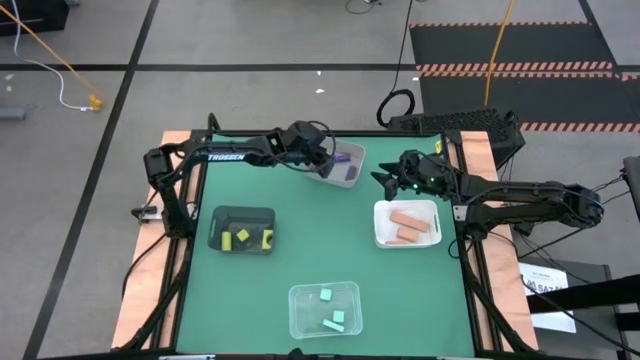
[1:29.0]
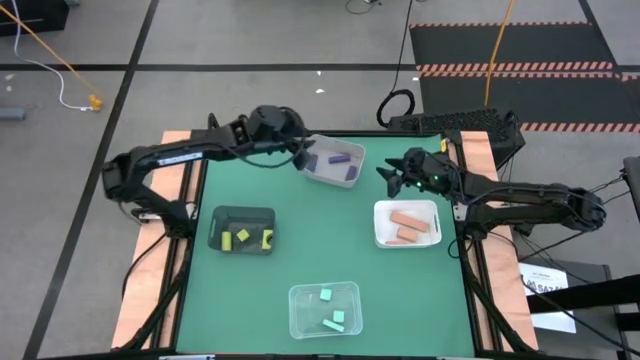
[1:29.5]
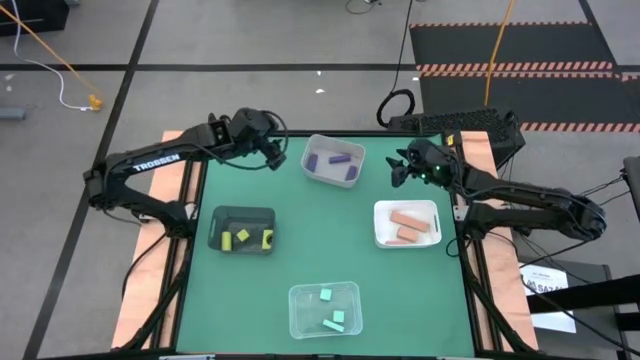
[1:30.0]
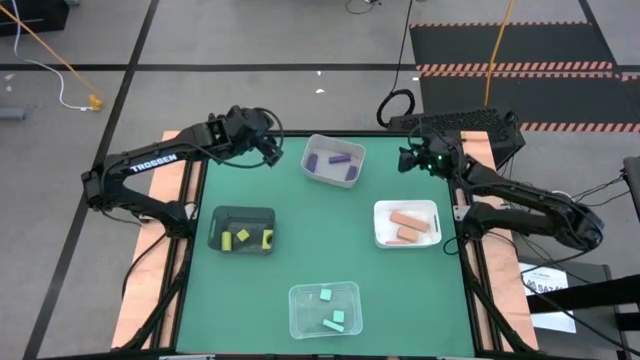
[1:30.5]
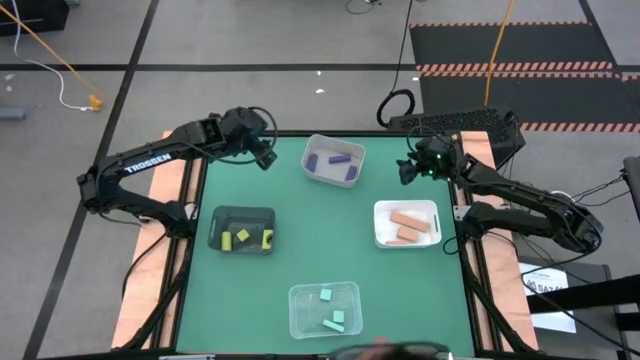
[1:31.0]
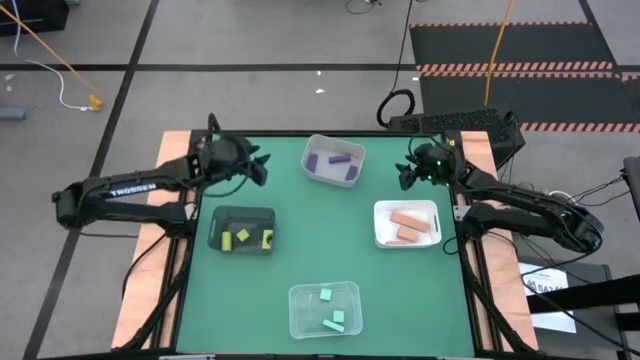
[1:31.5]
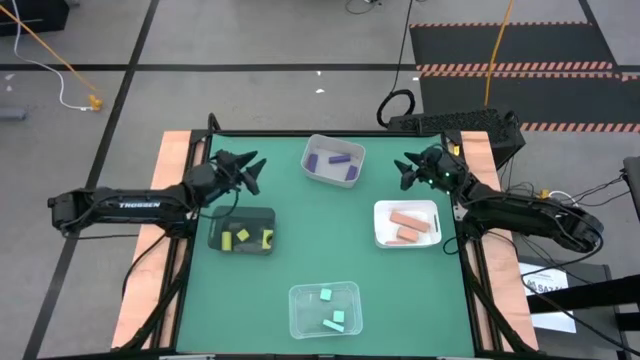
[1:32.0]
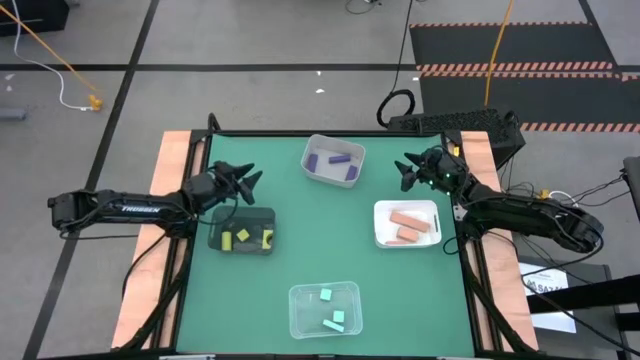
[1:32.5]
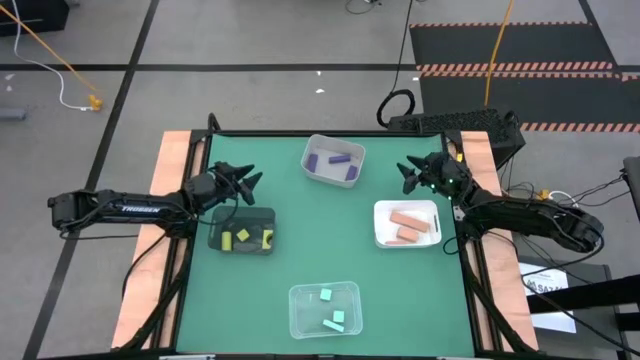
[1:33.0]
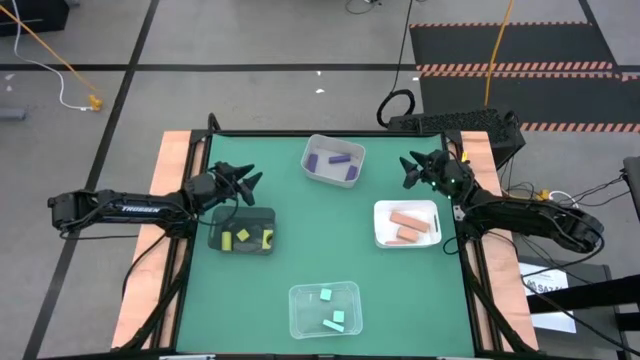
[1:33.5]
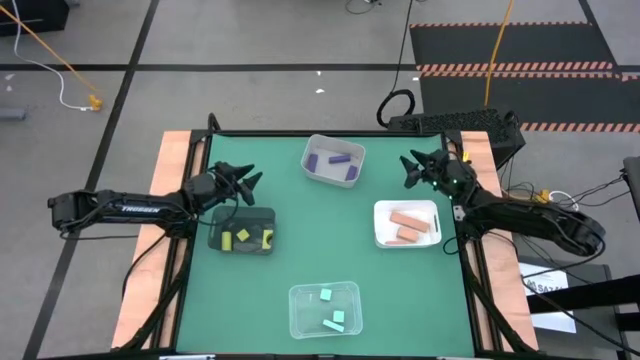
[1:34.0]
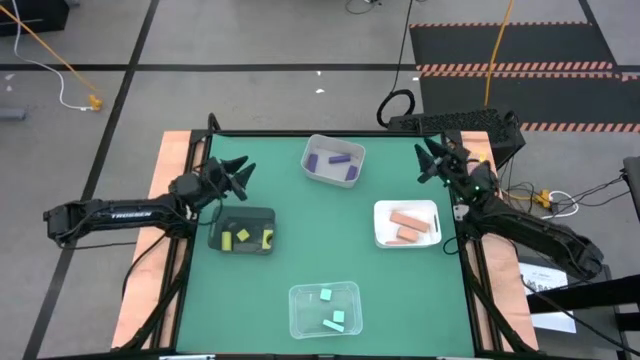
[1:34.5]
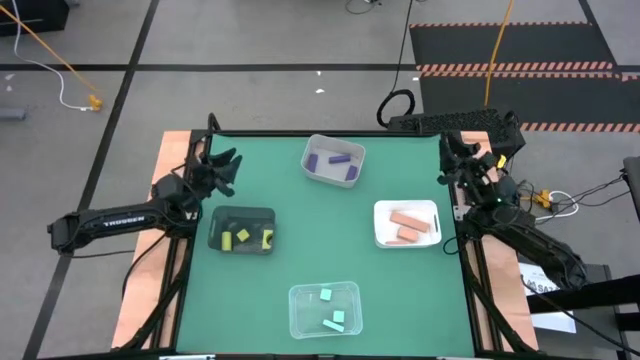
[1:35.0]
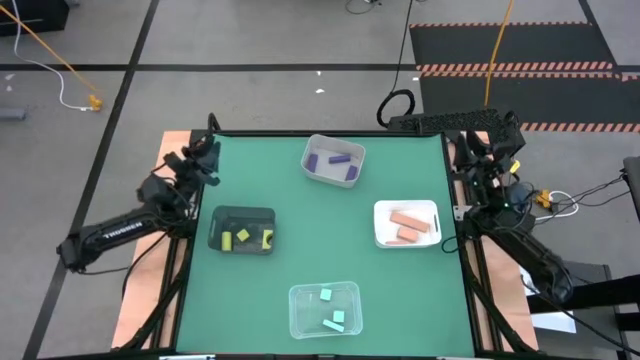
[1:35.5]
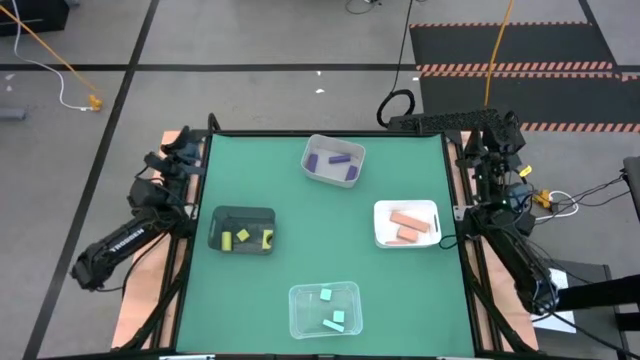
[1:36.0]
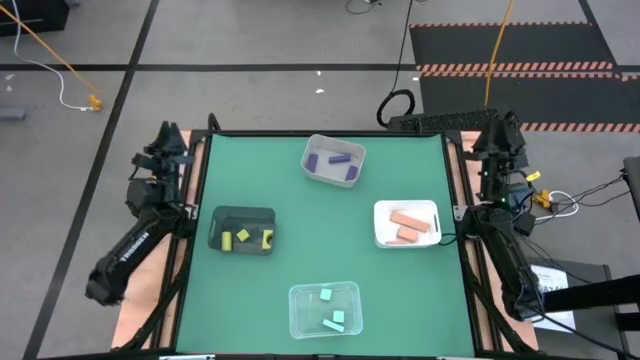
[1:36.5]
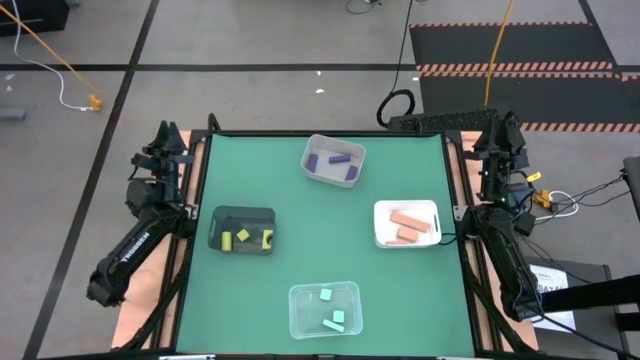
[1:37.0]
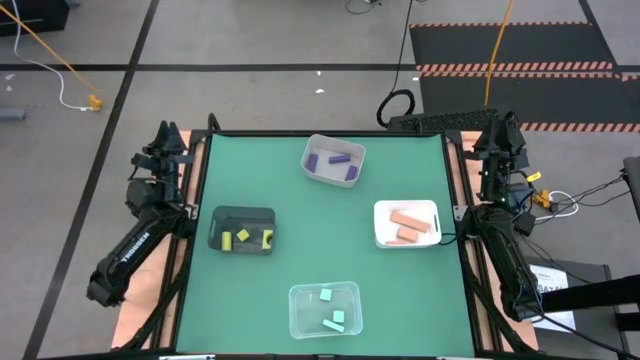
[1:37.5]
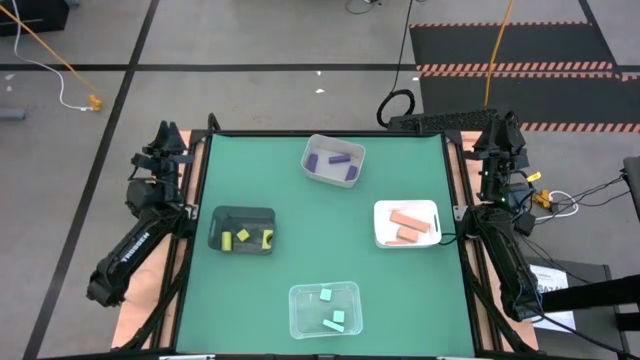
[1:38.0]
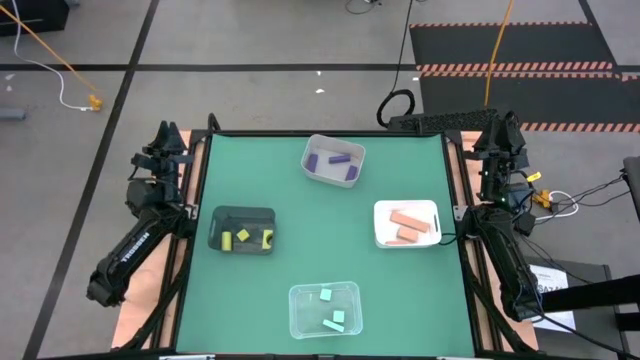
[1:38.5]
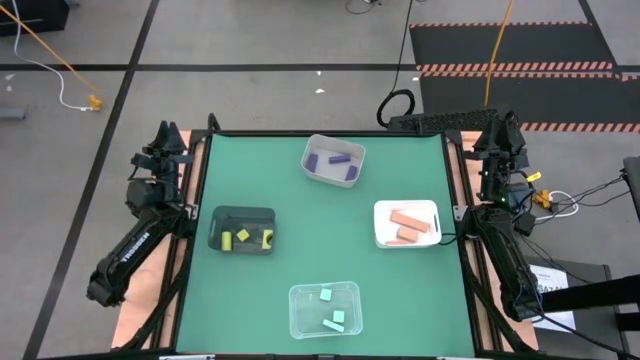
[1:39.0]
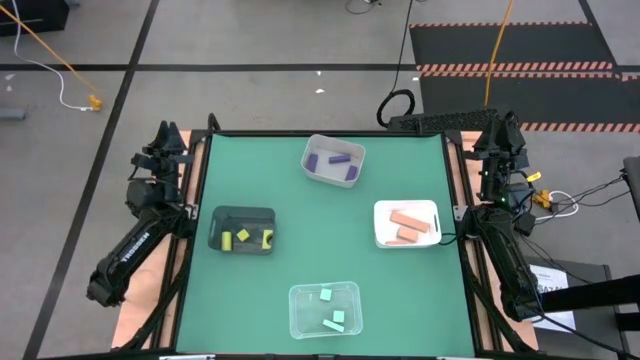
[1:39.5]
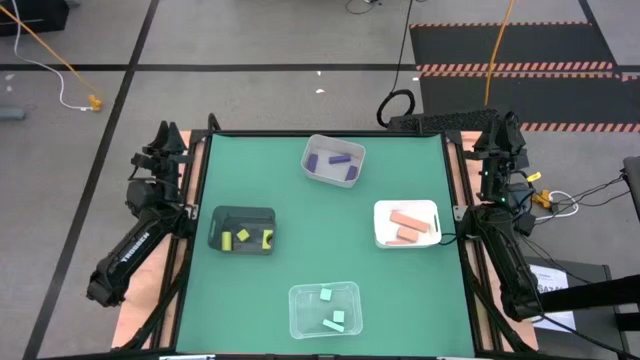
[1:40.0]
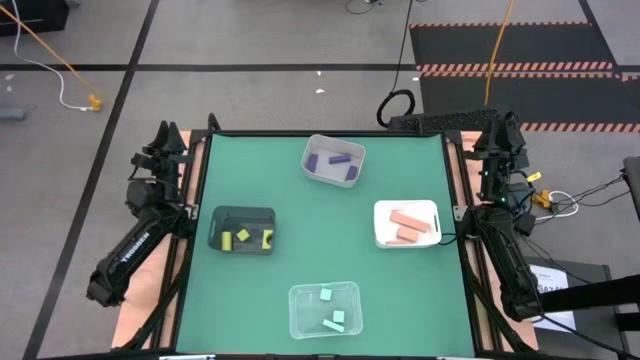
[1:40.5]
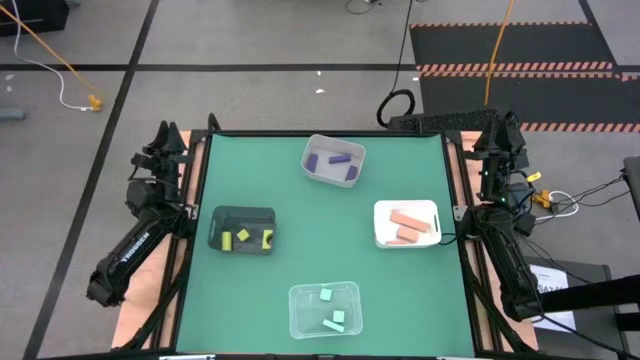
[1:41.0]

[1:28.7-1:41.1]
Task: Sort & place blocks by color
Return to Home Position

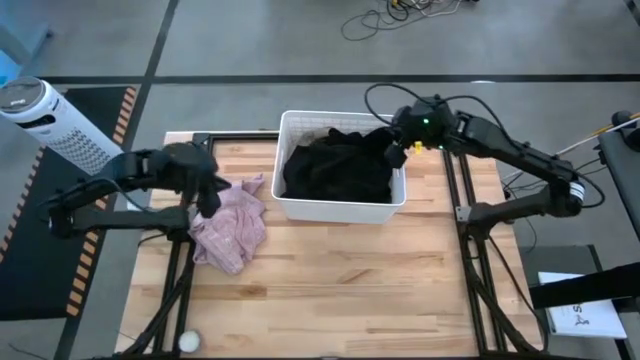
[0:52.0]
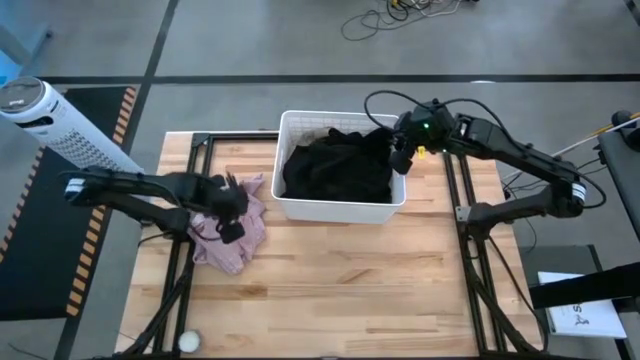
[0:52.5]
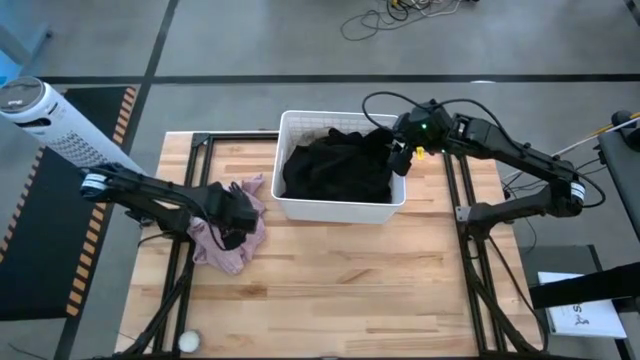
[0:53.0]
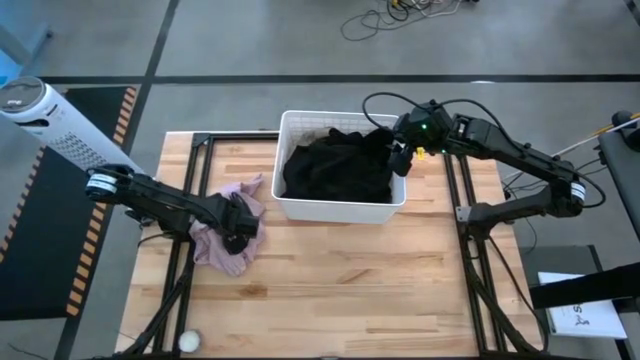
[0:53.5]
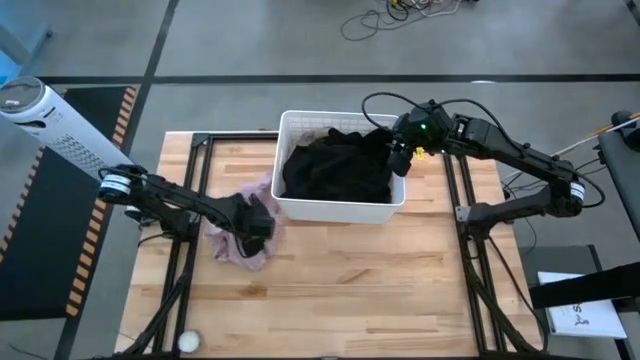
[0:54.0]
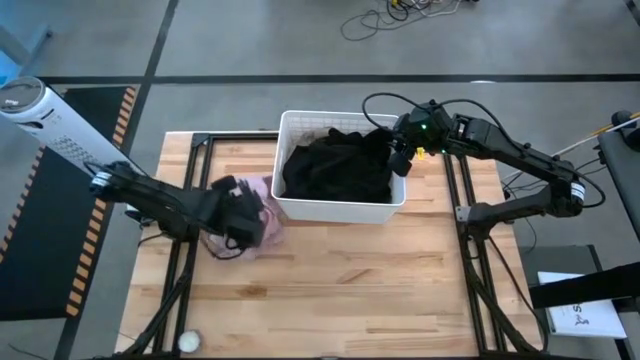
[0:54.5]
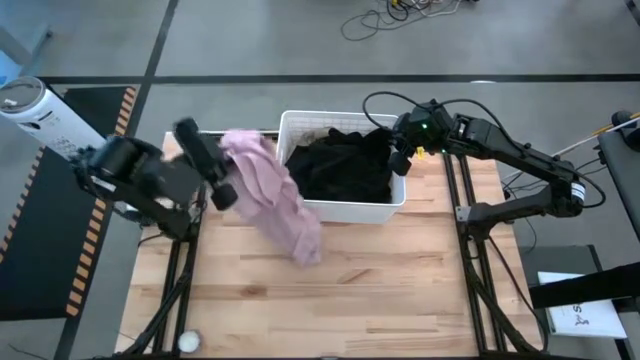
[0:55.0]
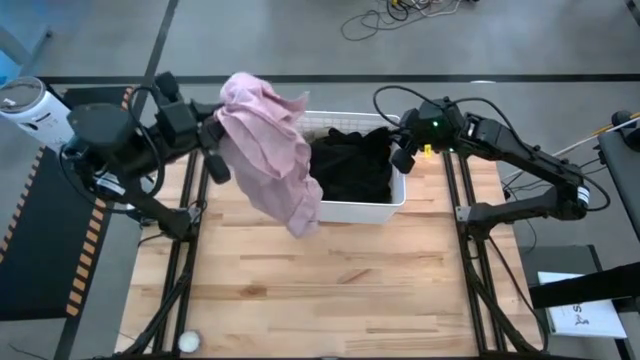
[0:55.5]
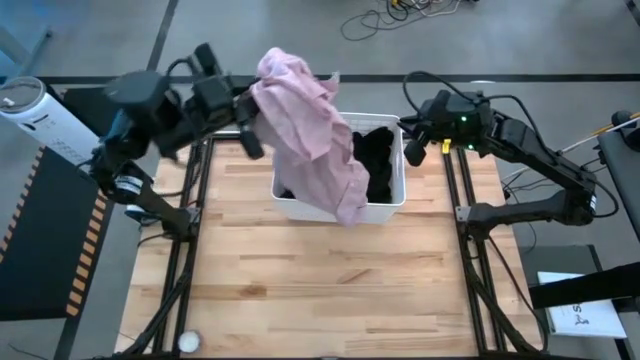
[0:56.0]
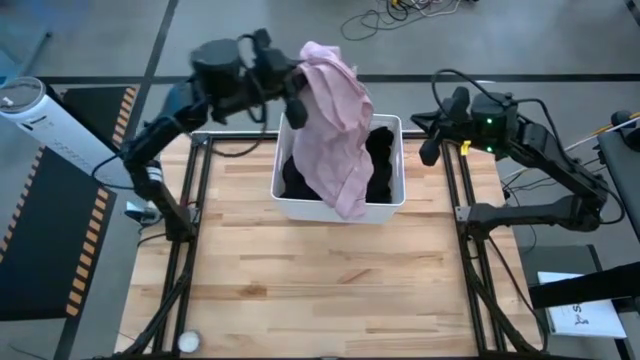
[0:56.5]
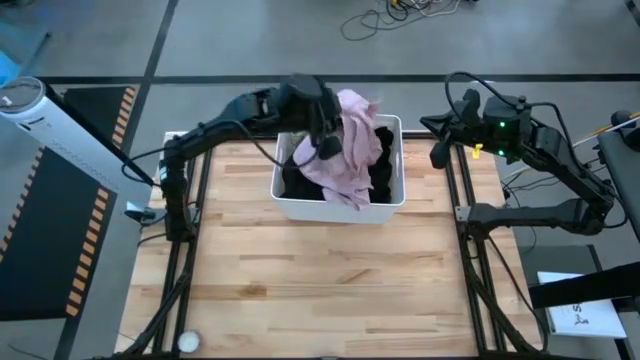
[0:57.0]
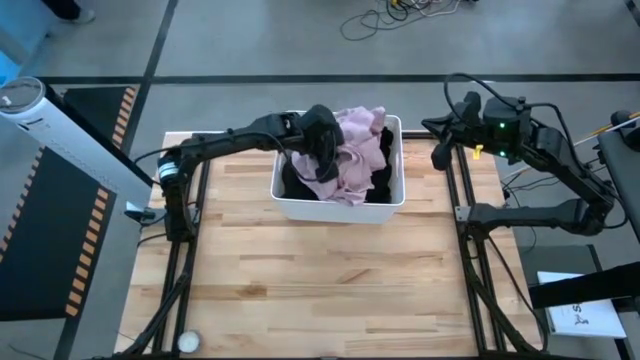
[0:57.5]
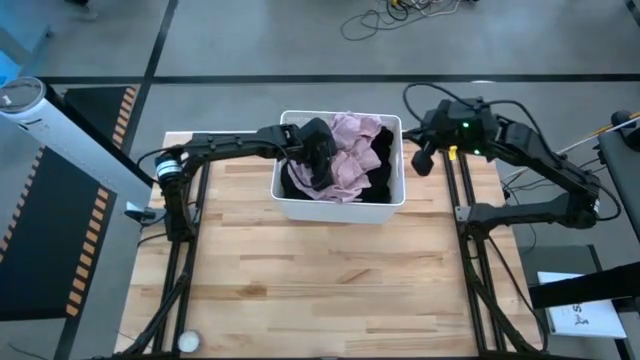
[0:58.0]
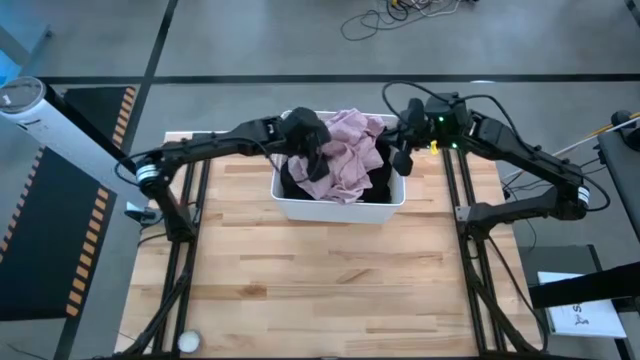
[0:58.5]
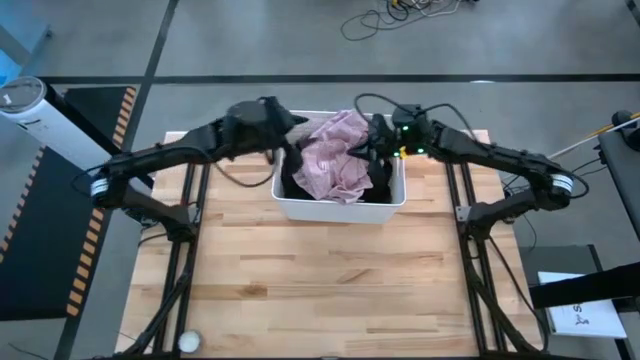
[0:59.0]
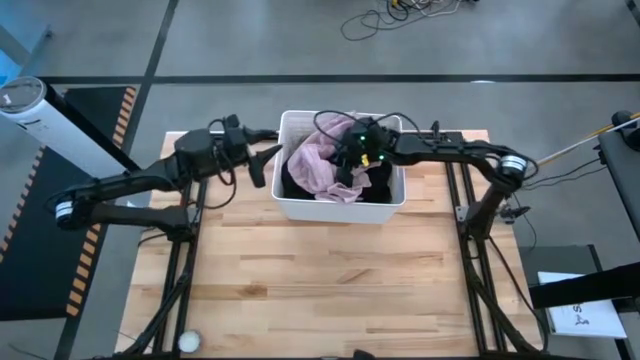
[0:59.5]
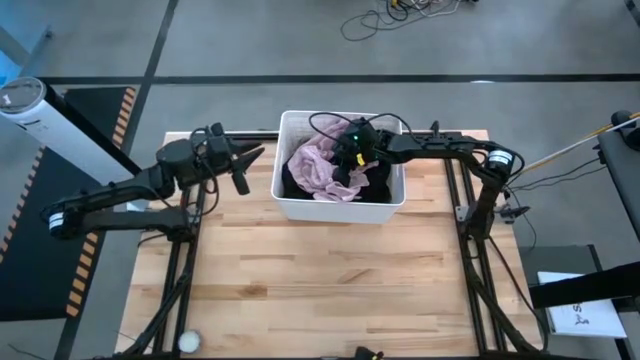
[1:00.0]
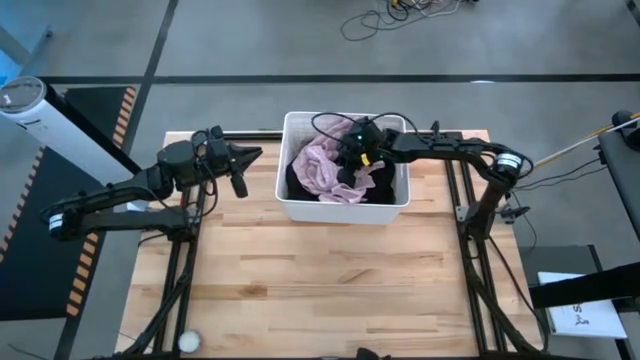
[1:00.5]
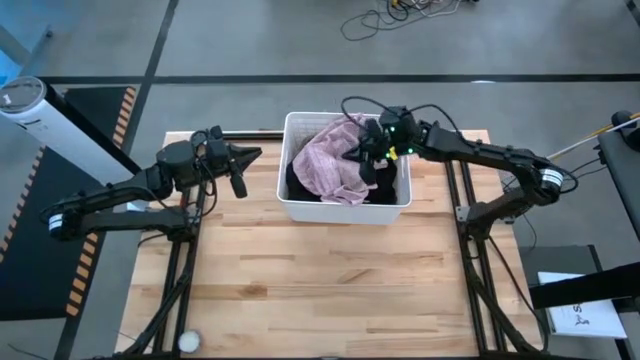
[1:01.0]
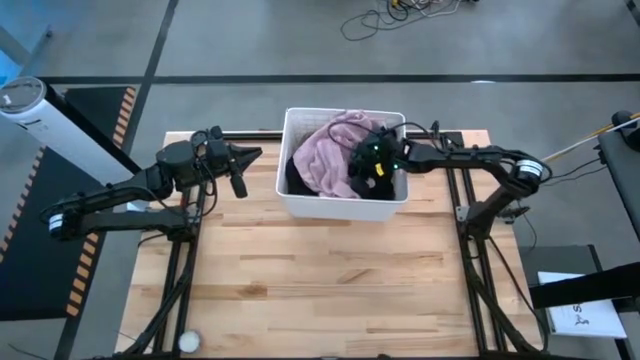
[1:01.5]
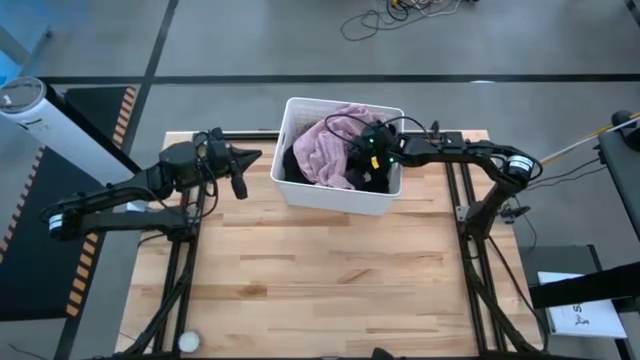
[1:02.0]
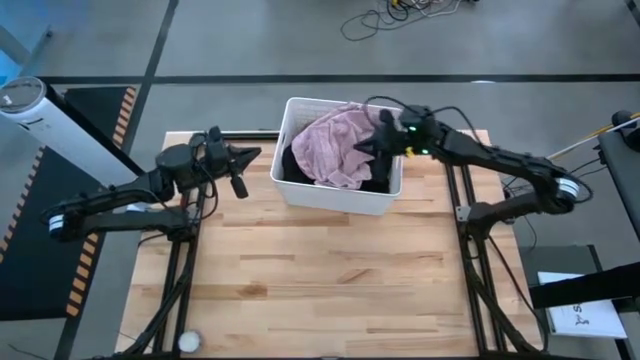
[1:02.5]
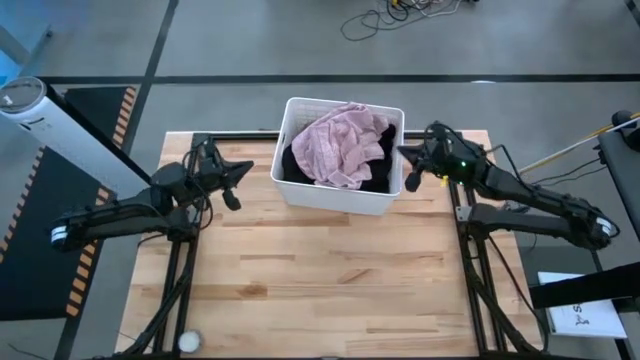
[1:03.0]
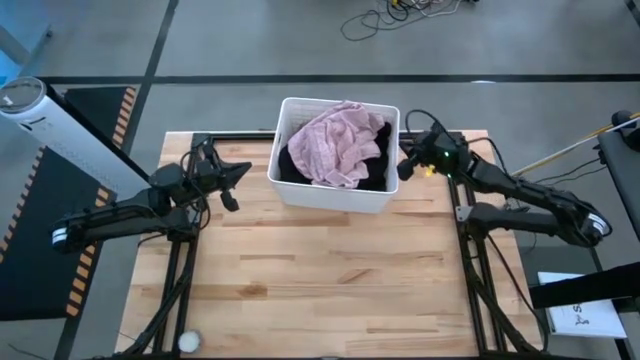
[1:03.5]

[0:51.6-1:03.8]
Task: Sort clothes
Put the pink shirt into the white laundry bin
